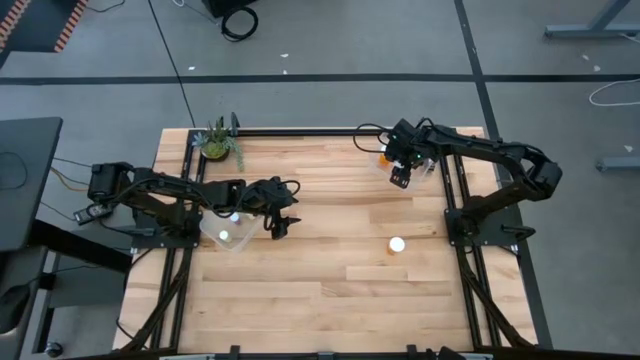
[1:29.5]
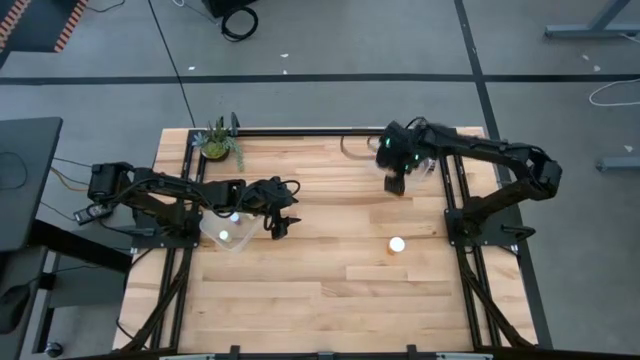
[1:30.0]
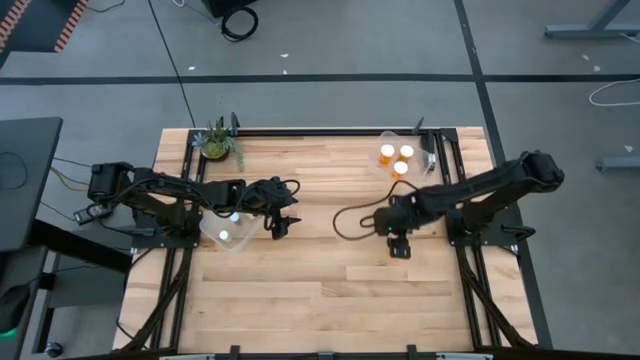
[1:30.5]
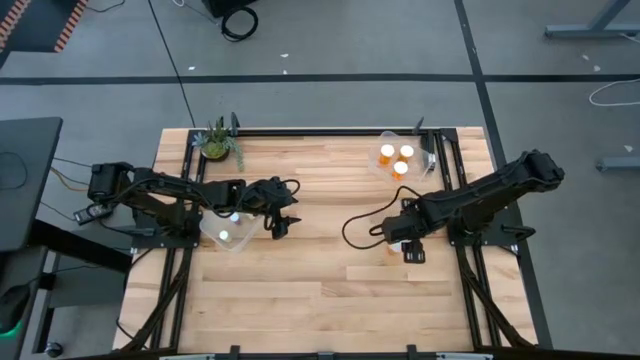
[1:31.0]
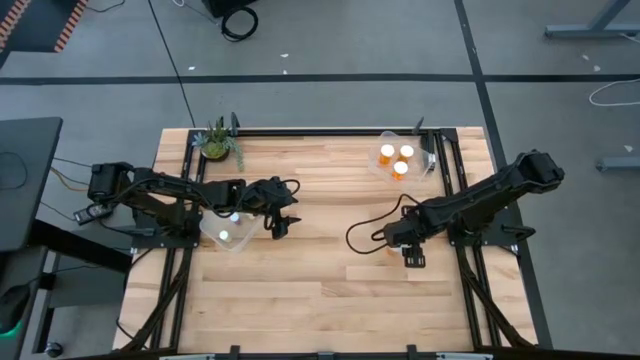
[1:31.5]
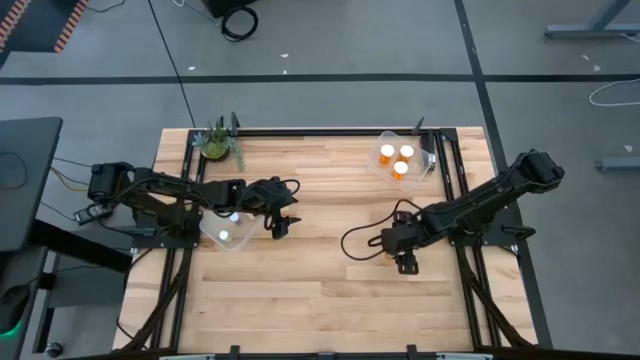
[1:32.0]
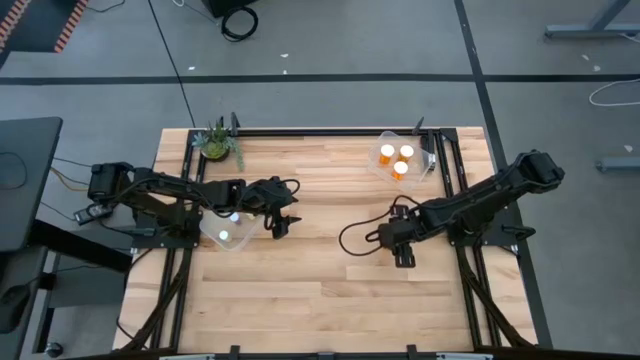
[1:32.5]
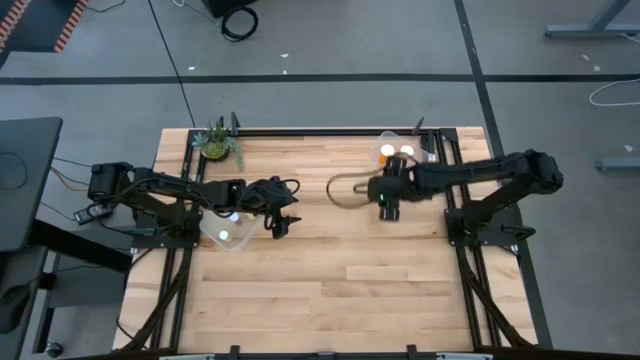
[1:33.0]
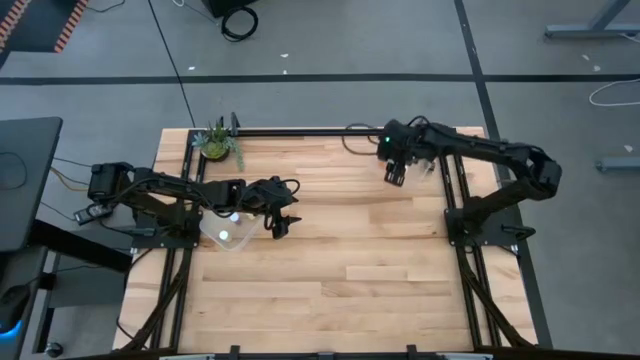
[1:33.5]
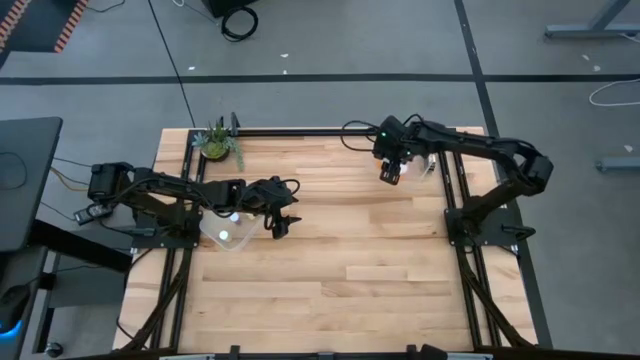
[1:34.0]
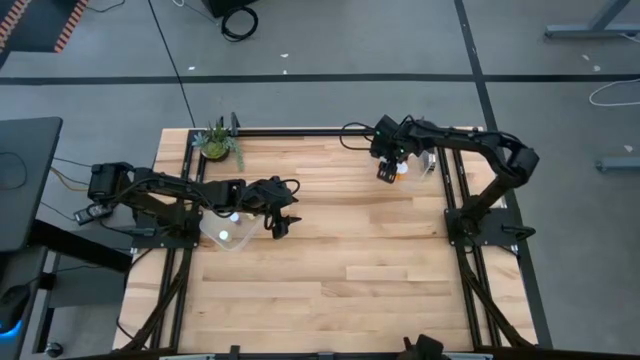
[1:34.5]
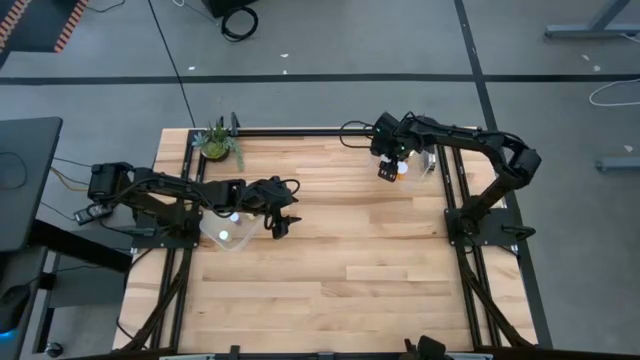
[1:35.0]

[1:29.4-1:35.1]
Task: Pick and place medicine bottles into bin by pill shape (circle, oval)
Put the large orange pill bottle into the right transparent bin

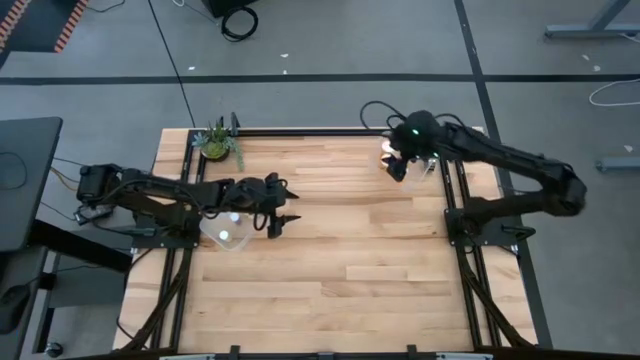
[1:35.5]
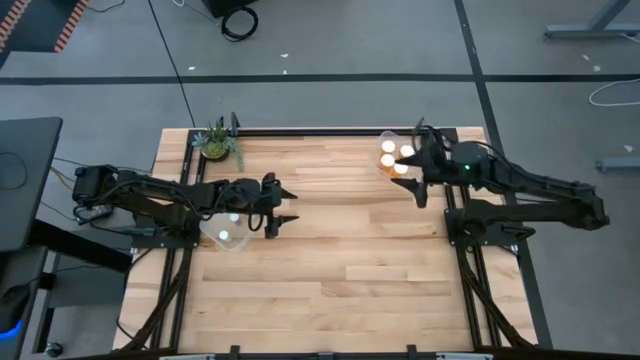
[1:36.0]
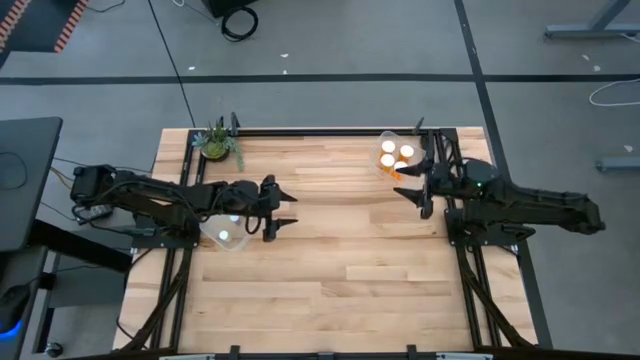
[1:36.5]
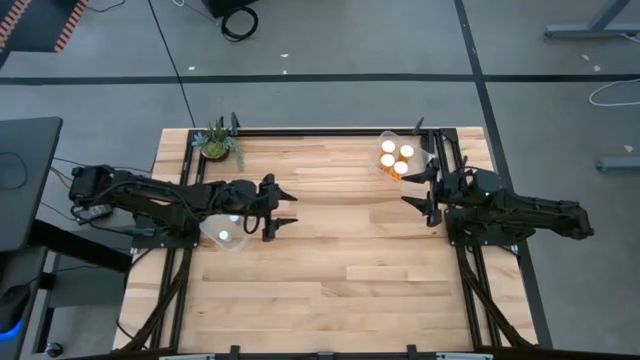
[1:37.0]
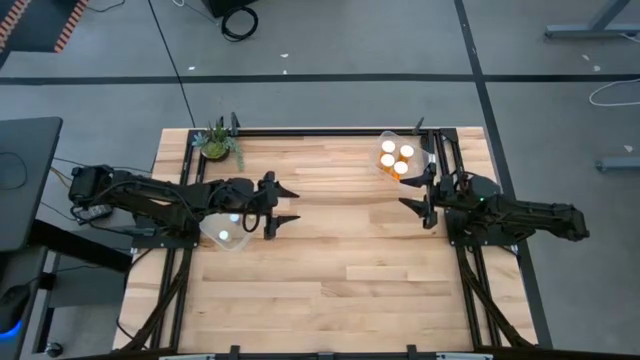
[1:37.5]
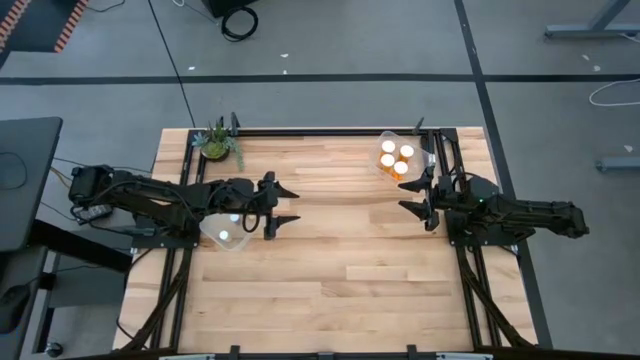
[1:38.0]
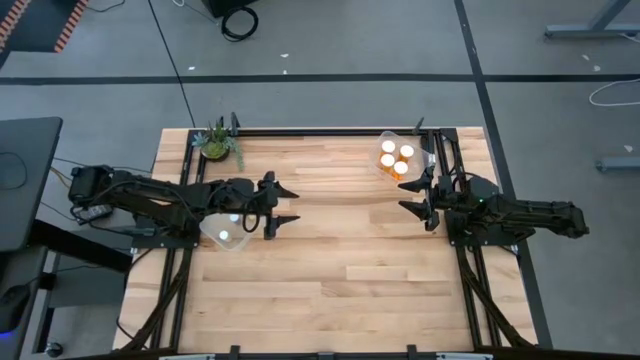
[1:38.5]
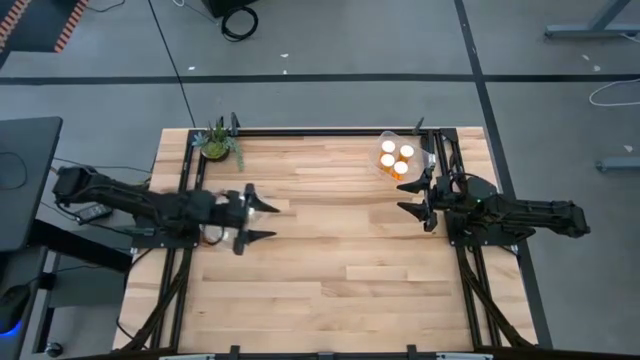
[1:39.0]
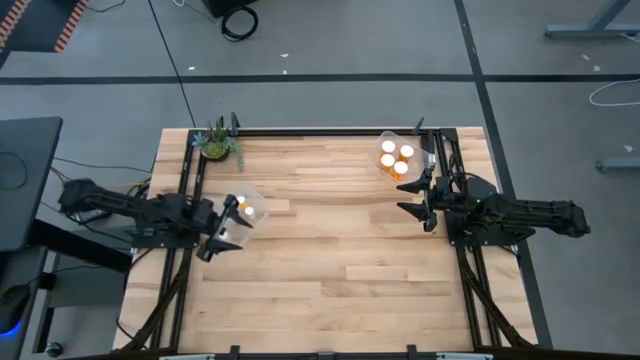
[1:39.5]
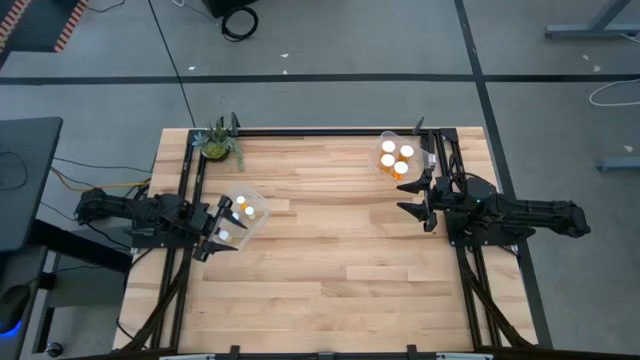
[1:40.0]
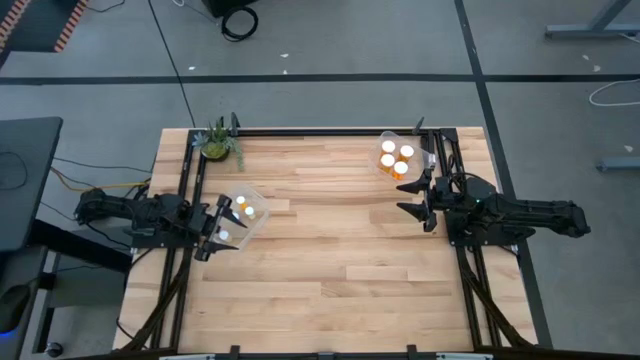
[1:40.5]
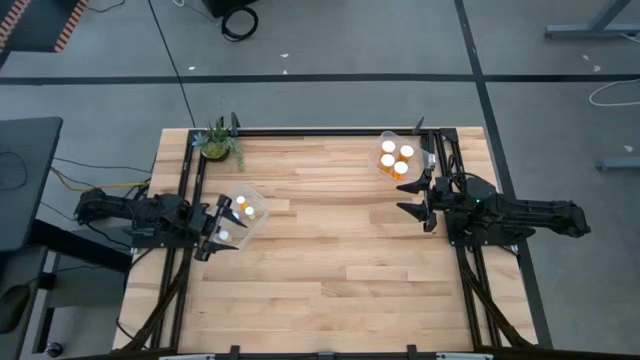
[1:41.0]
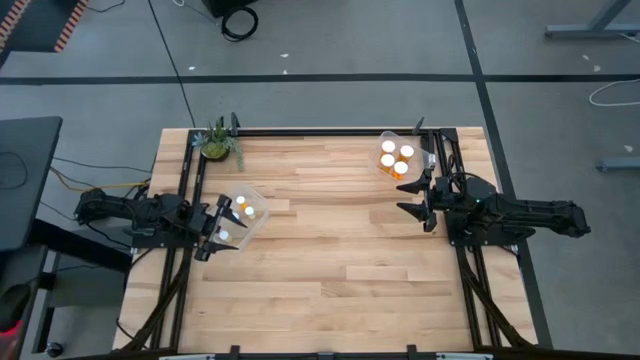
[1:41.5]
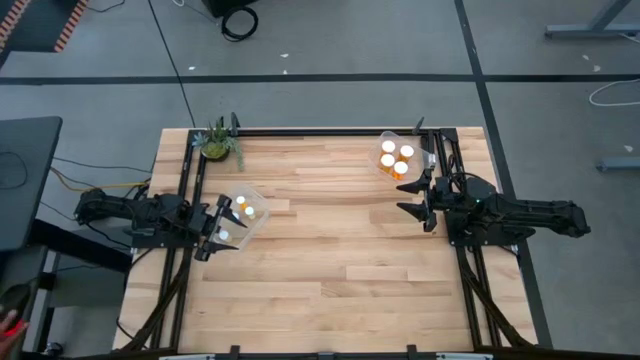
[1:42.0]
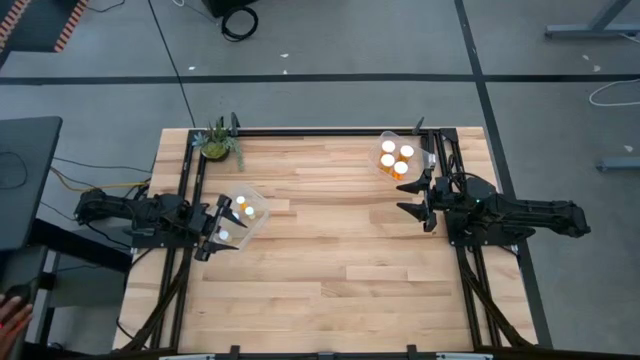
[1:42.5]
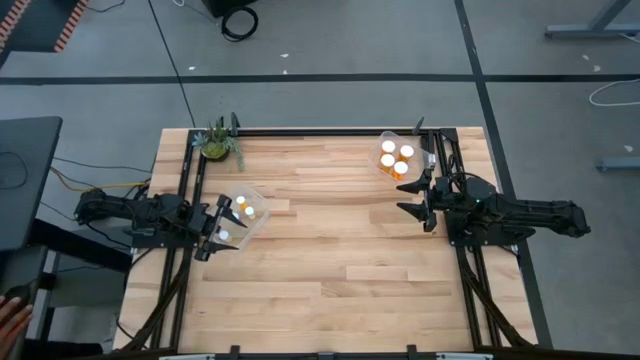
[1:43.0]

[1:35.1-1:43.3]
Return to Home Position

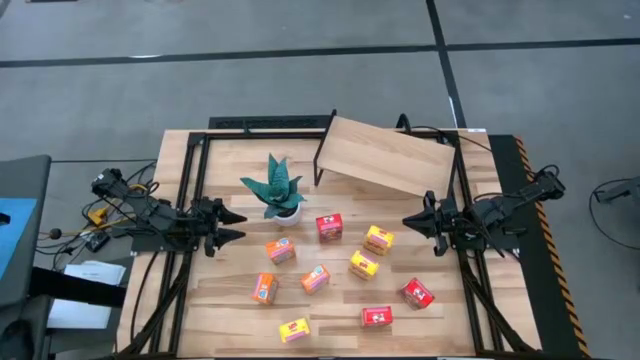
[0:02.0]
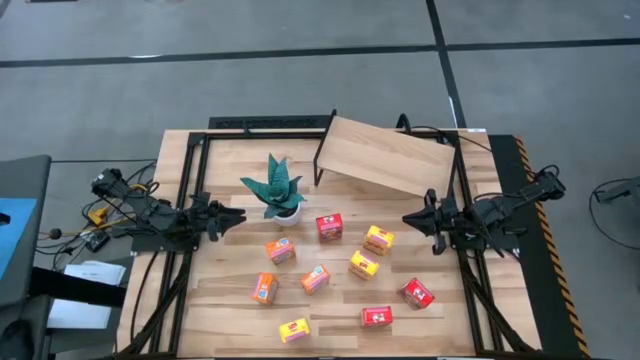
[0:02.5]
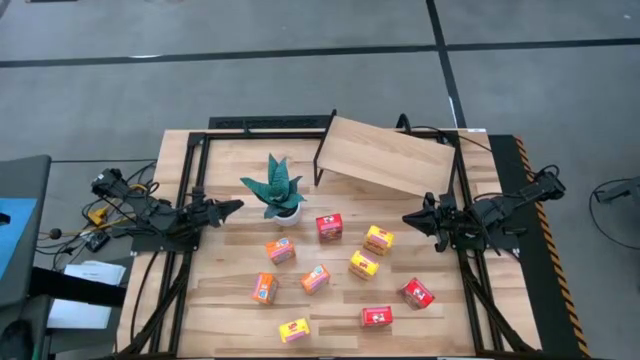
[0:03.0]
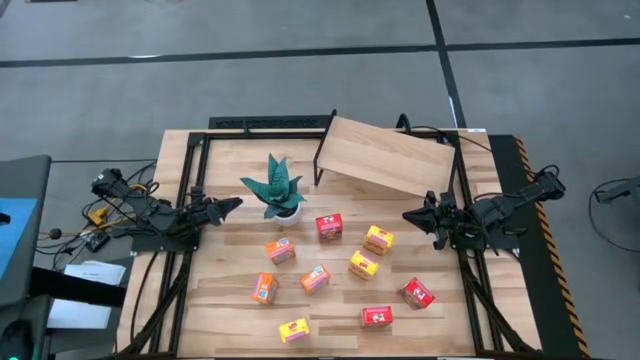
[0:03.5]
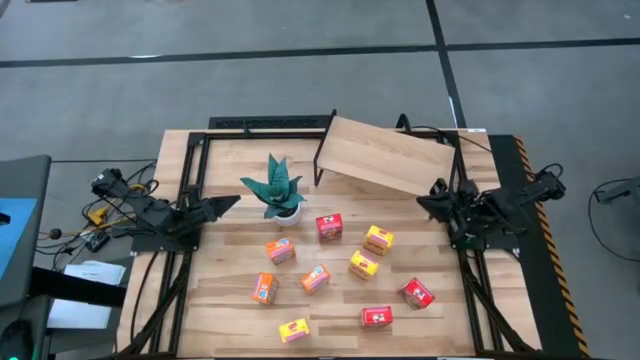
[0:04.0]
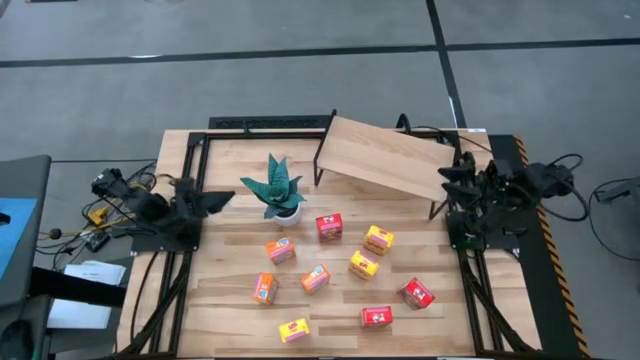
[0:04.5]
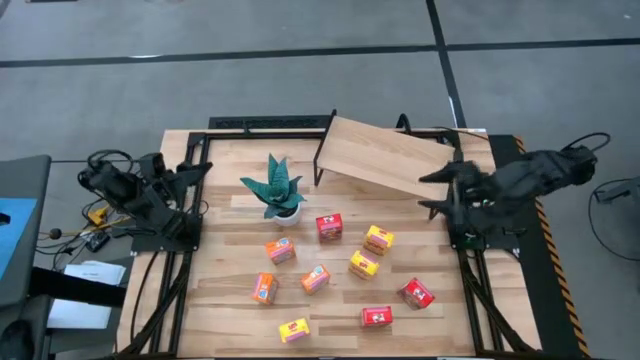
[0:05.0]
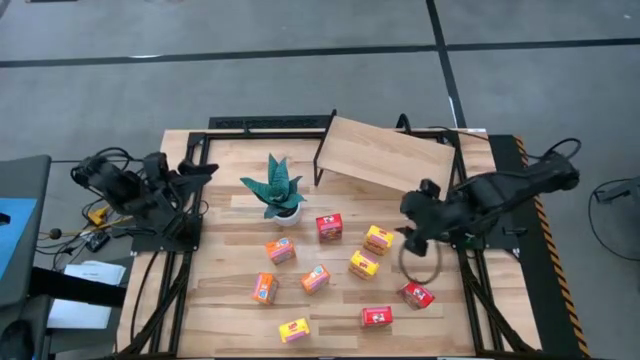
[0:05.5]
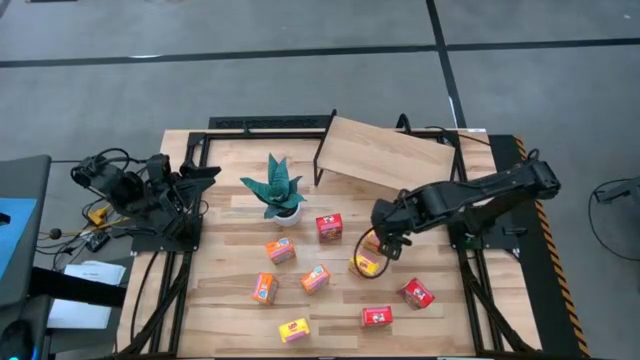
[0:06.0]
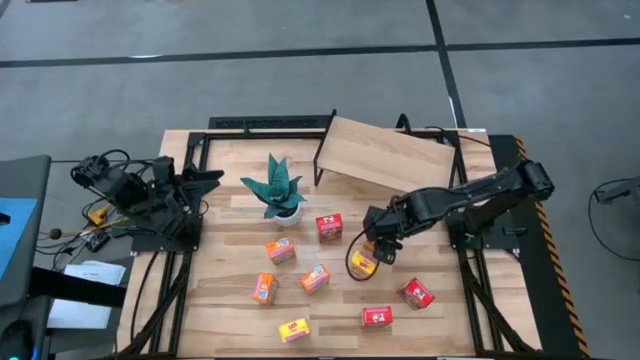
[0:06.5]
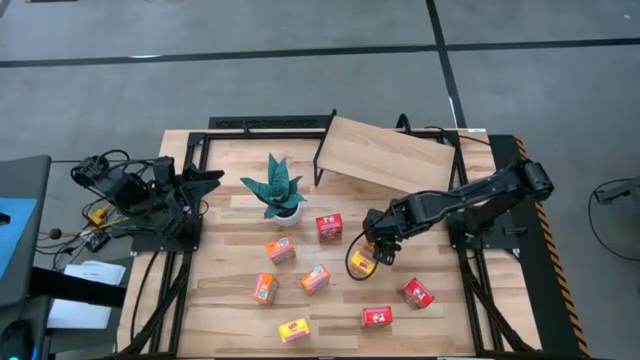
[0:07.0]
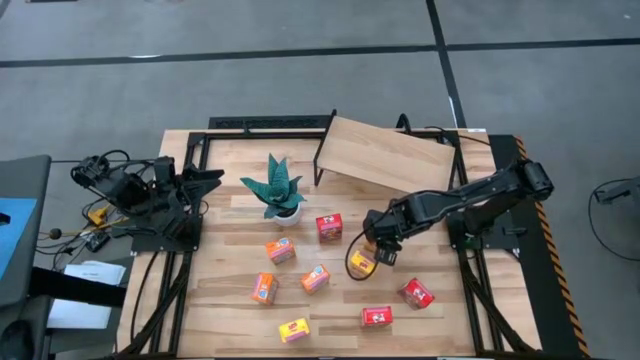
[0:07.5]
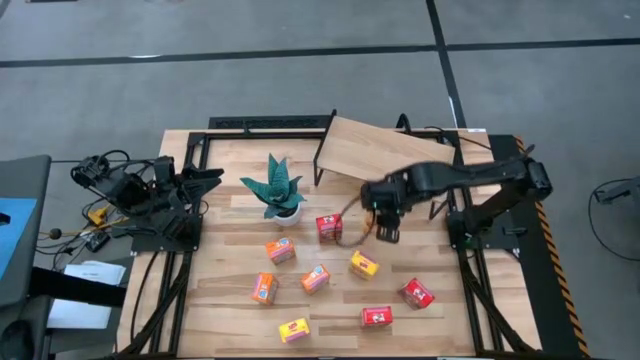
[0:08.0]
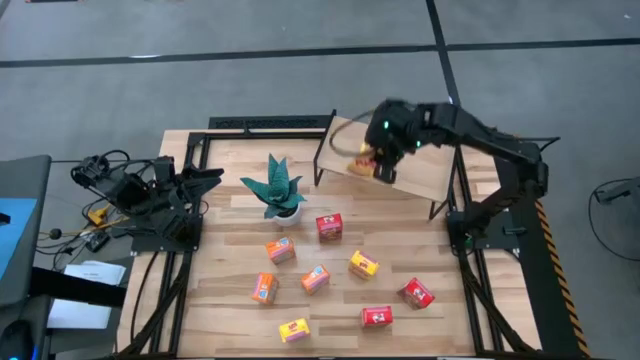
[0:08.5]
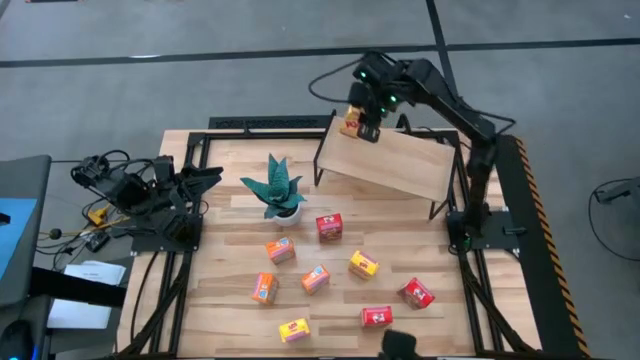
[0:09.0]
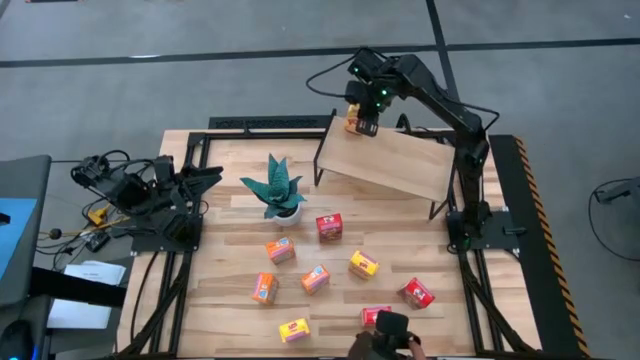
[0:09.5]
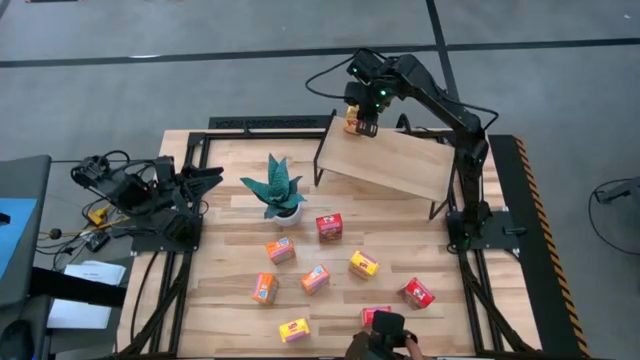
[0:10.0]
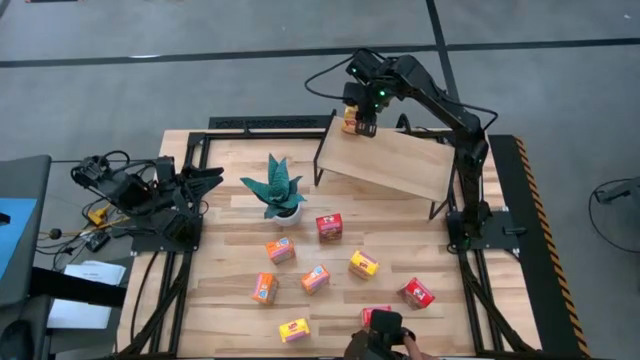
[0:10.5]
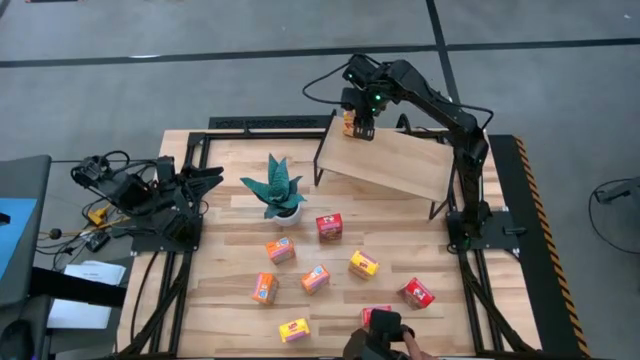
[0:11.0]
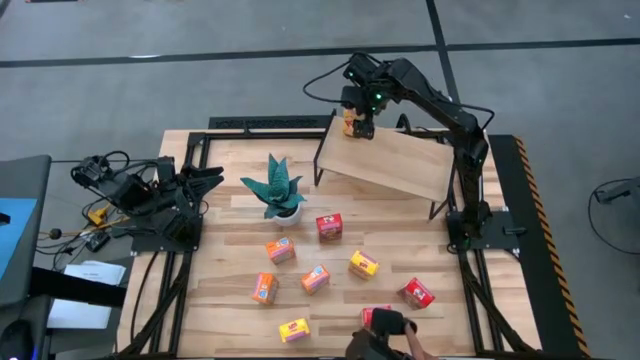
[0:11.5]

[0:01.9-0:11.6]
Task: Stack cereal on shelf
Put the top yellow cereal box on the shelf
